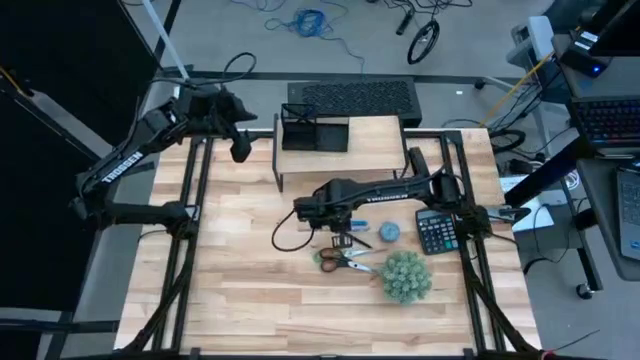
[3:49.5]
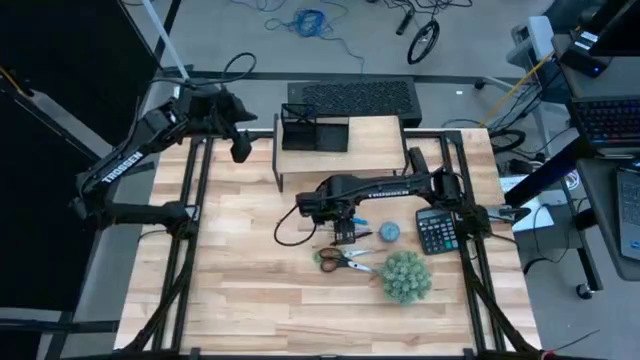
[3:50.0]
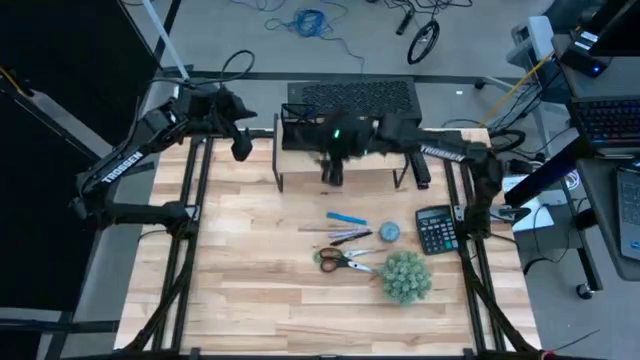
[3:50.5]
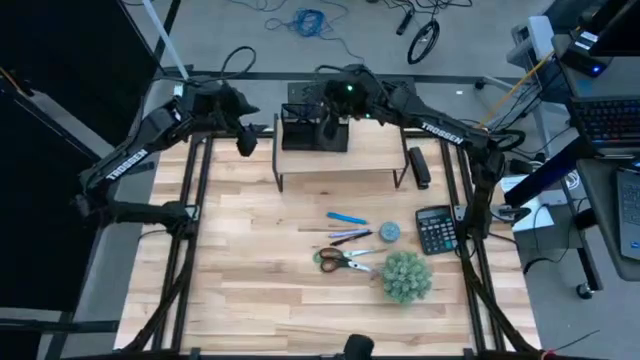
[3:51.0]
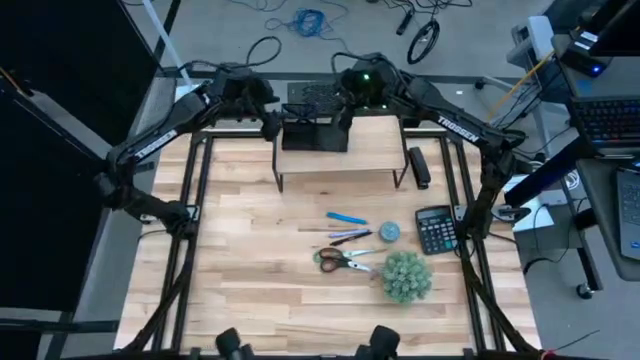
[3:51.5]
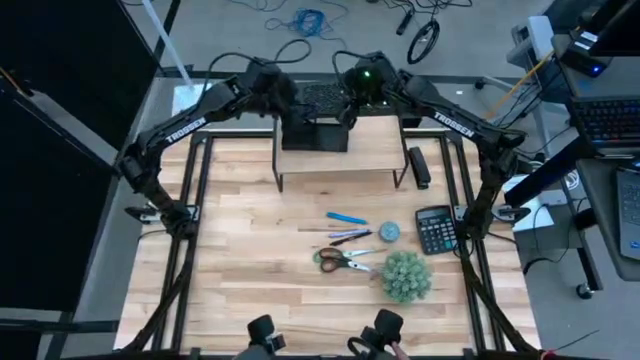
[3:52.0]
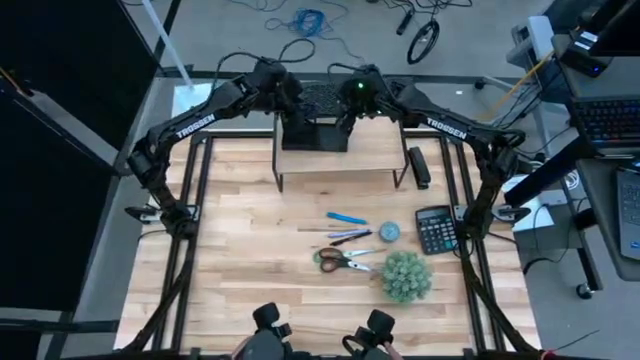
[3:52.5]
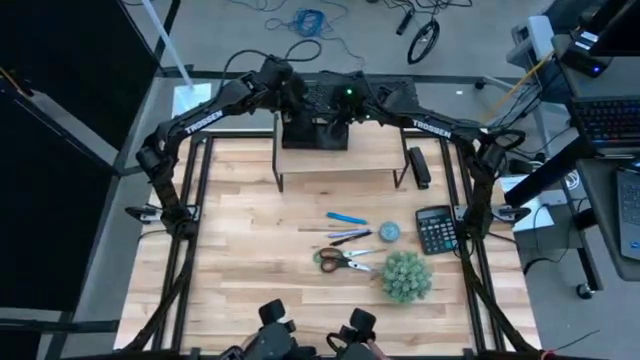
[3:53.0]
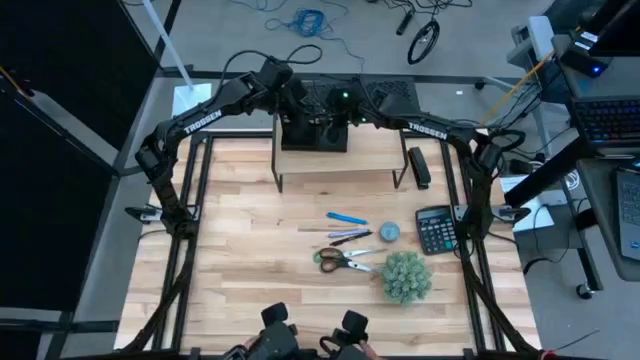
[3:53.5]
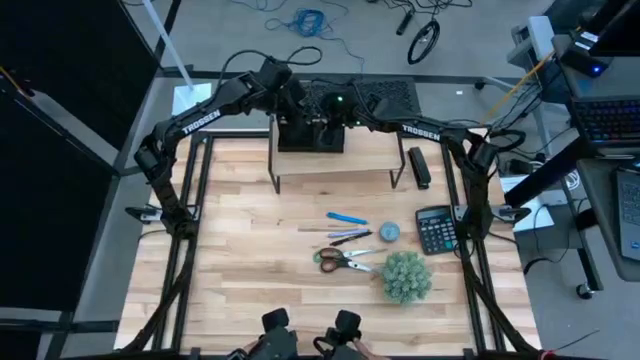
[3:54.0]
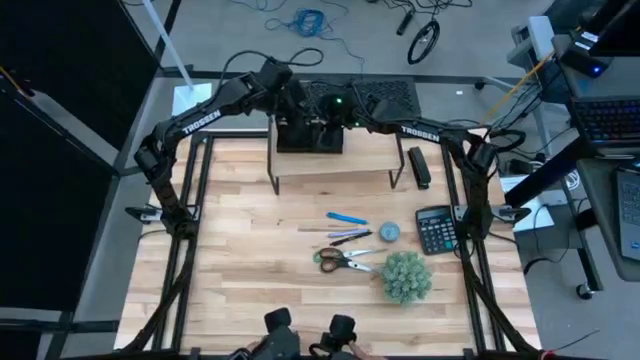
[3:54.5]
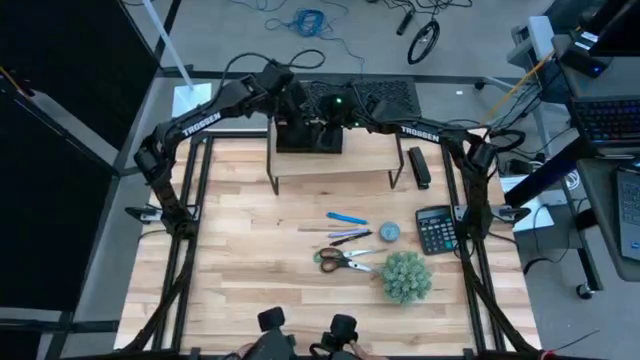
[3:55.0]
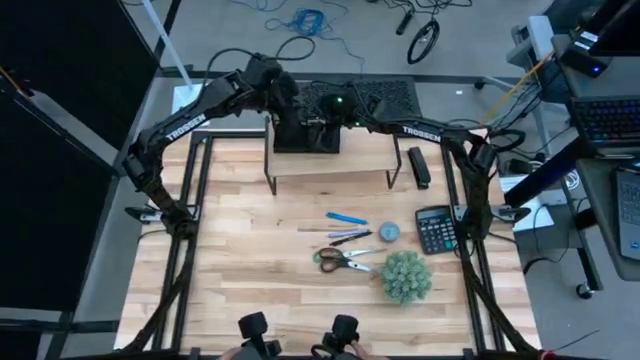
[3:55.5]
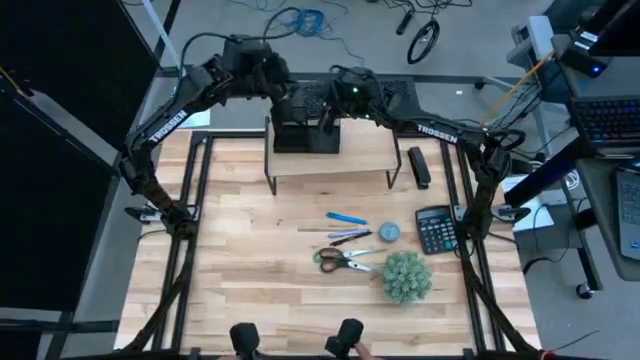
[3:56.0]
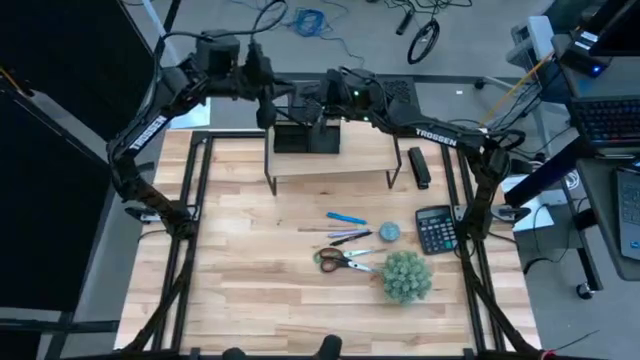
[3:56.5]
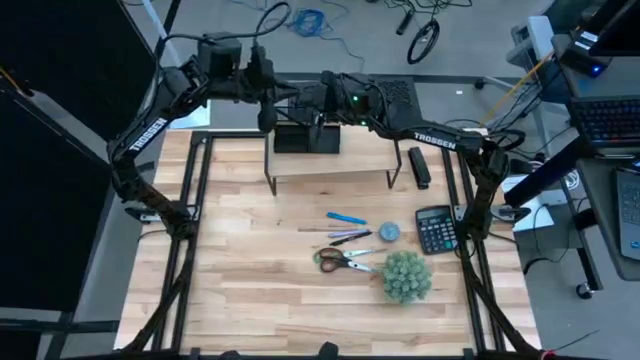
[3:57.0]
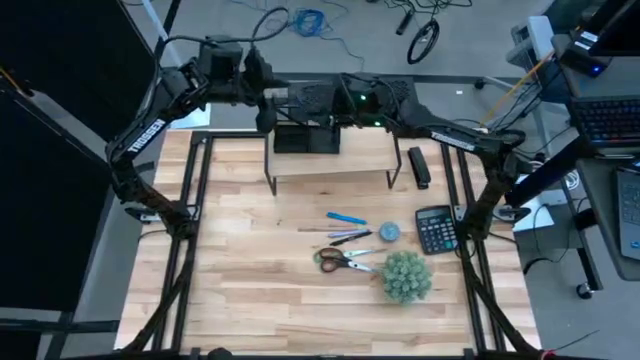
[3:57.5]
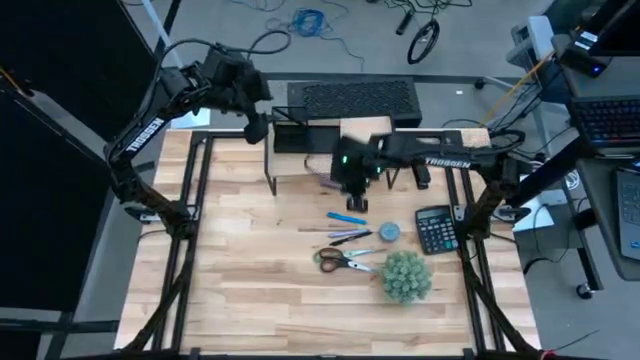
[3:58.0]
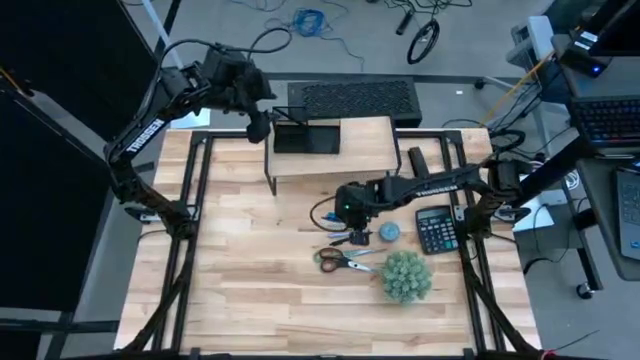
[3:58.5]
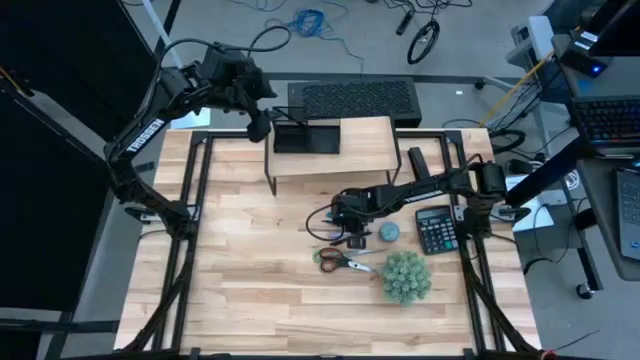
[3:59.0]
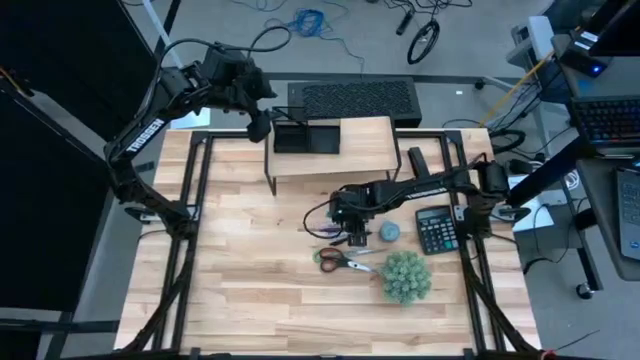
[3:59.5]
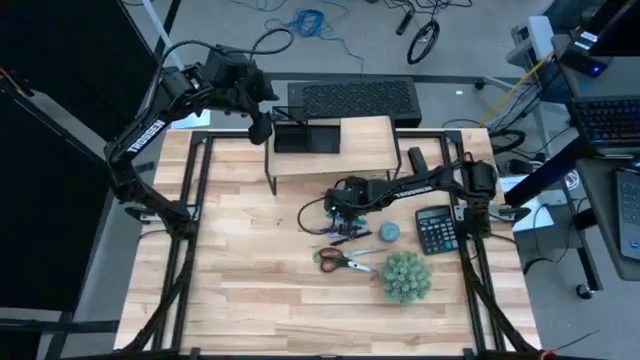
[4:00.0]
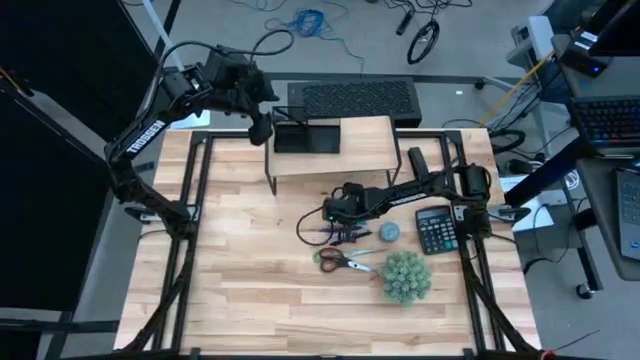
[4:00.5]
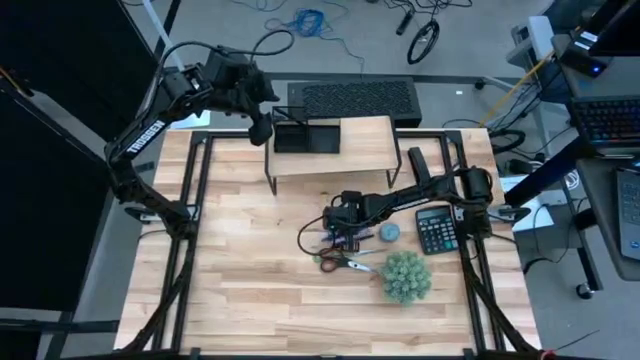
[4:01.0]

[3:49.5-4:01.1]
Task: Pick and place office supplies into organizer
Remove the dark blue pen from the desk organizer on the shelf

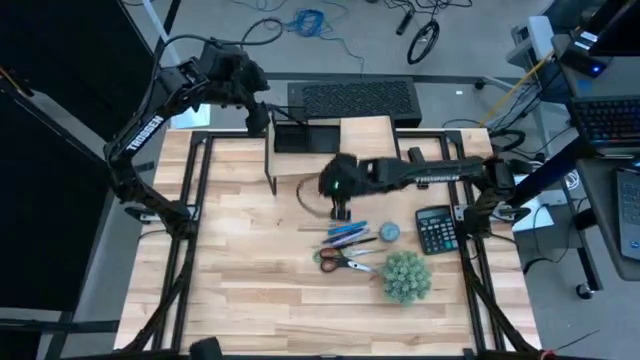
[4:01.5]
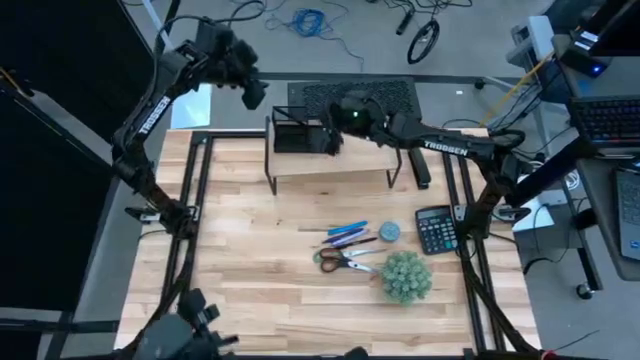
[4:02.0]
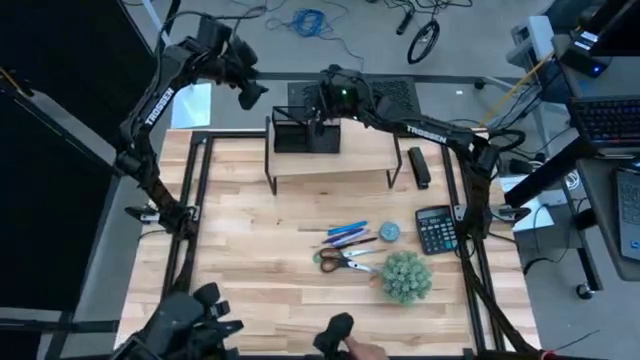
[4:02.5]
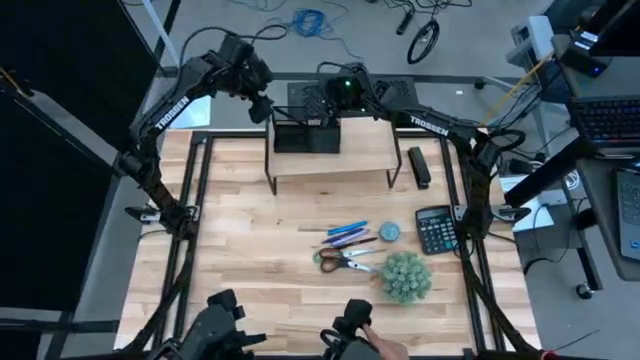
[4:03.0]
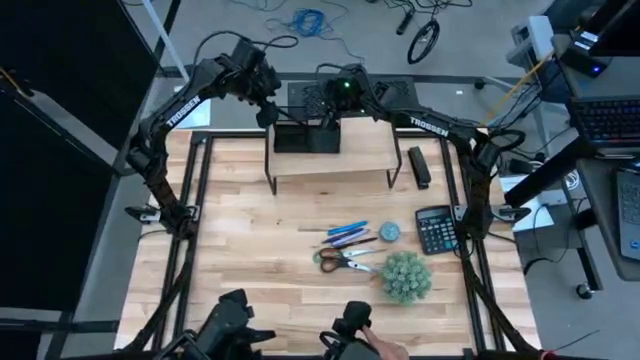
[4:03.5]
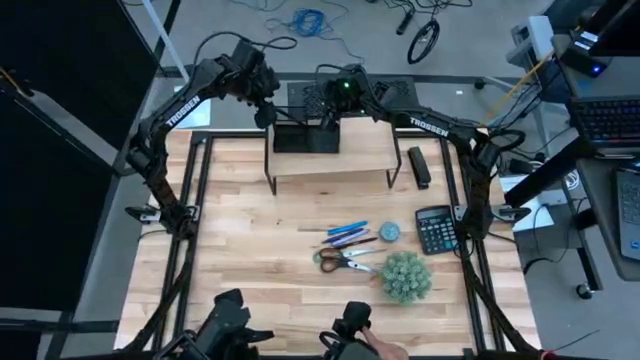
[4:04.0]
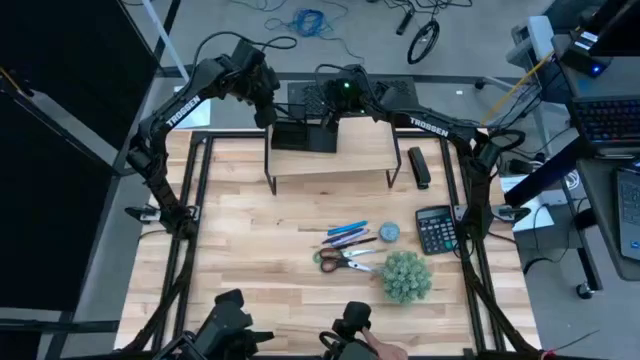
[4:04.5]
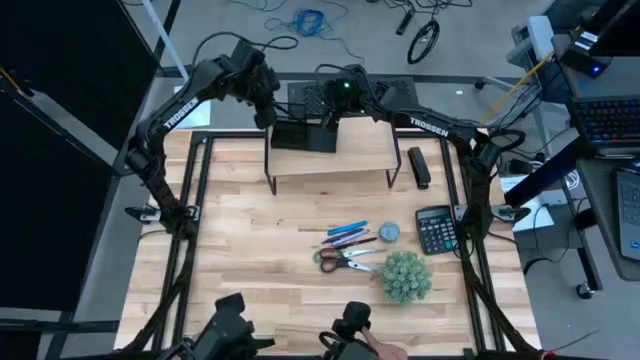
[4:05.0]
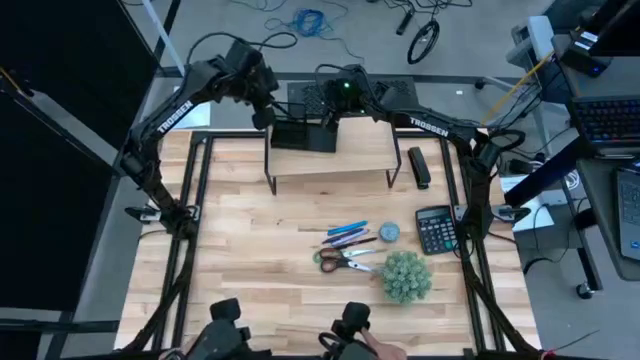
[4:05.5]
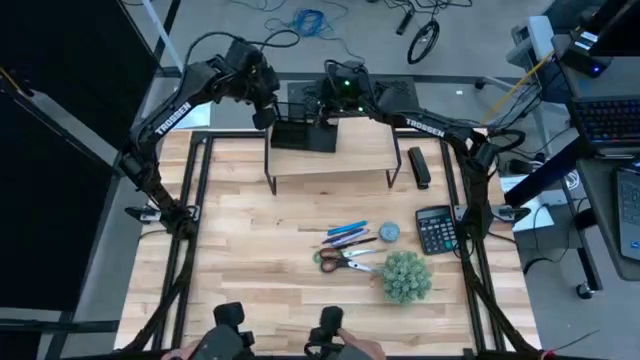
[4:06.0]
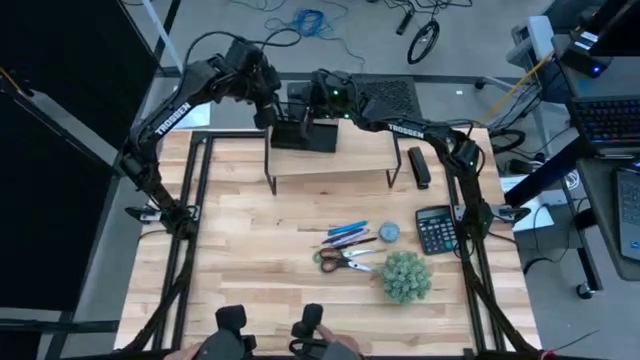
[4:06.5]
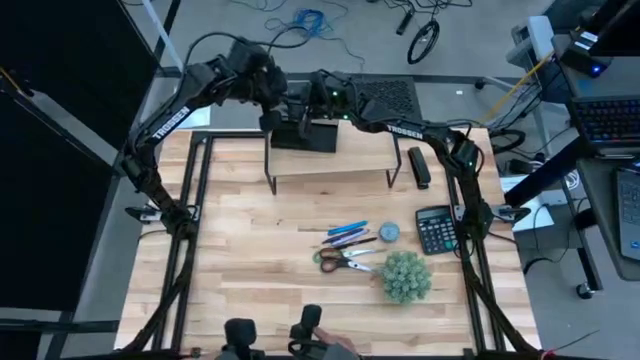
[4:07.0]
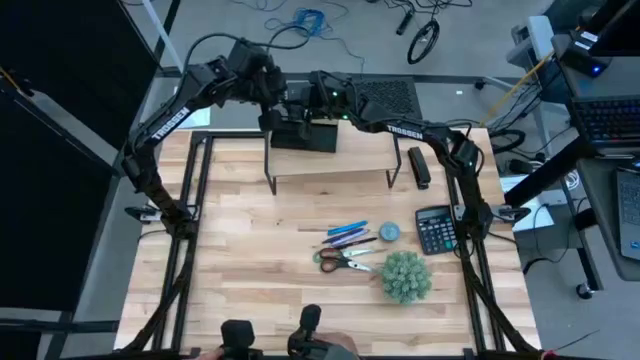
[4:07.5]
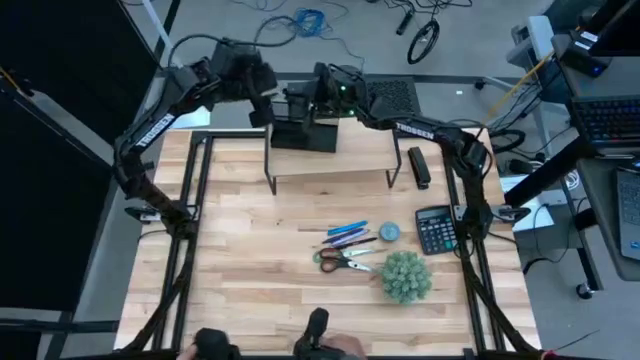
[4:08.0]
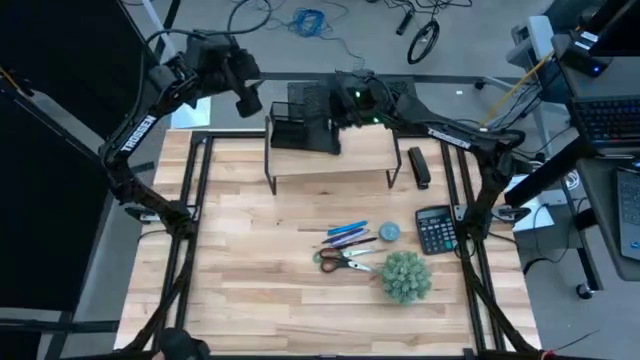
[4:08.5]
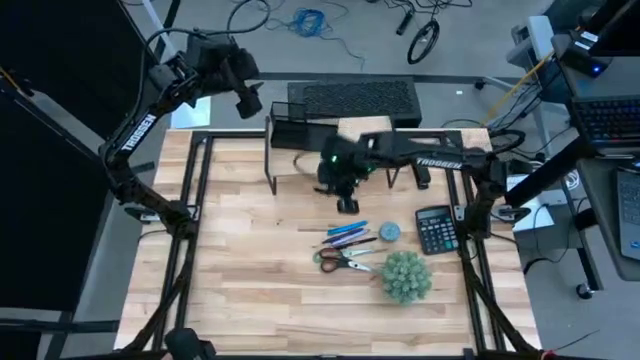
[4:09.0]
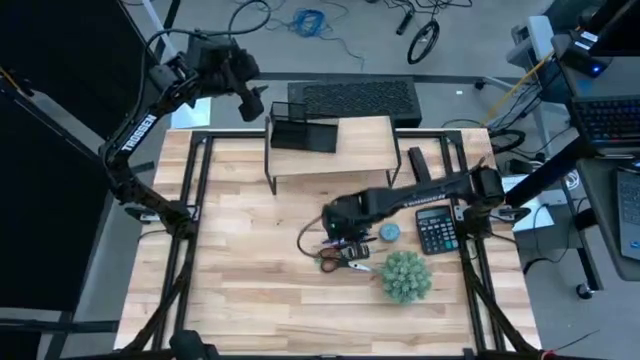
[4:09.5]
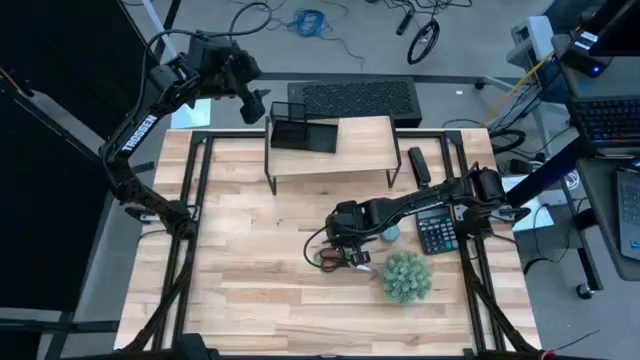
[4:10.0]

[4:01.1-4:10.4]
Remove the black pen from the desk organizer on the shelf

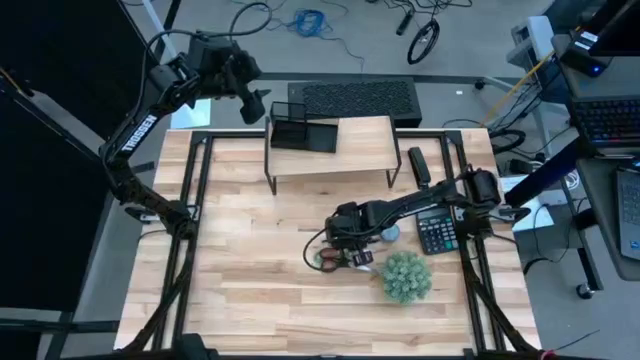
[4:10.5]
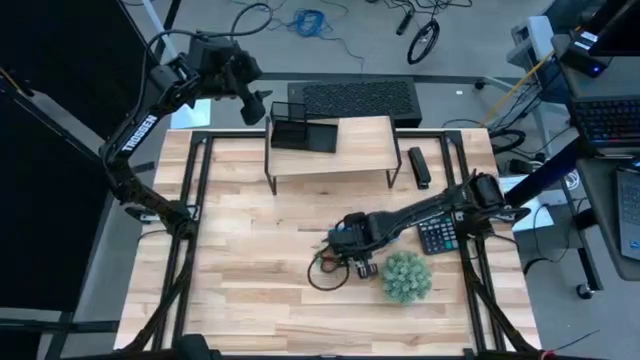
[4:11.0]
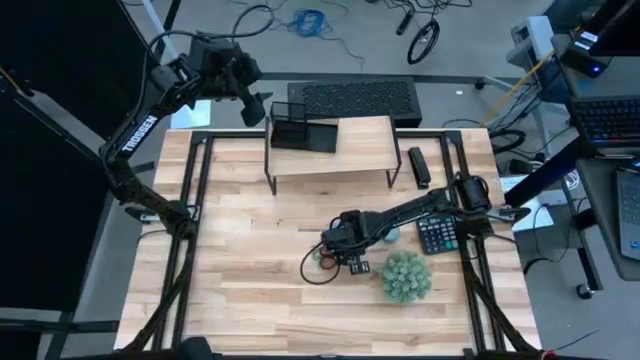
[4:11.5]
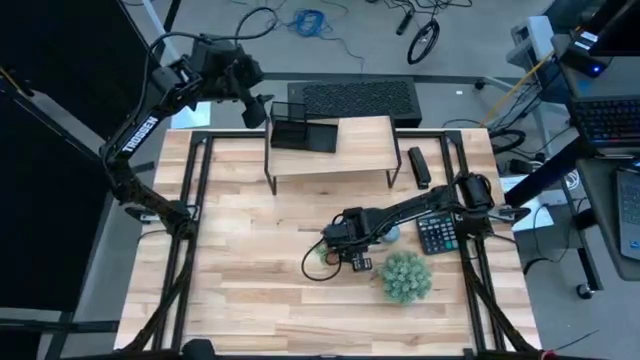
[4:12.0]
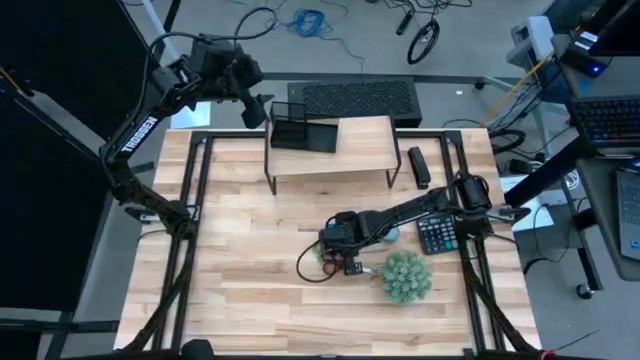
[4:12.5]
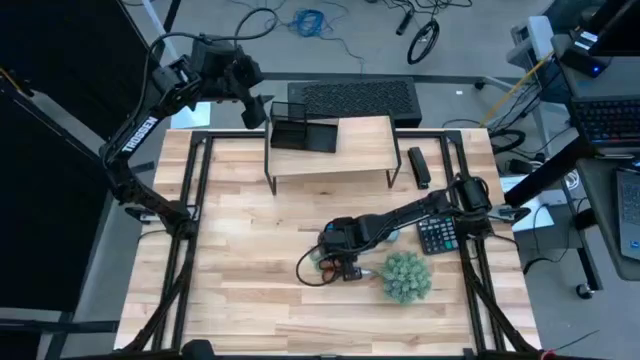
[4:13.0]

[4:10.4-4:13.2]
Adjust the green scissors on the table
